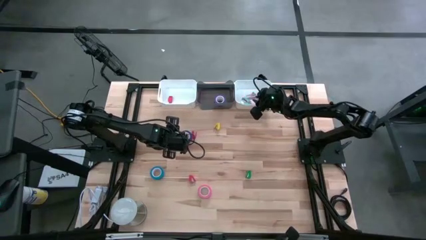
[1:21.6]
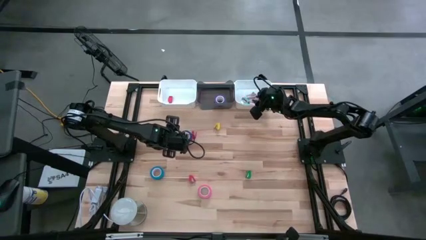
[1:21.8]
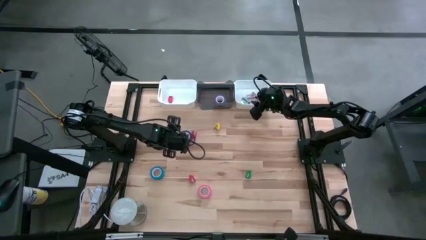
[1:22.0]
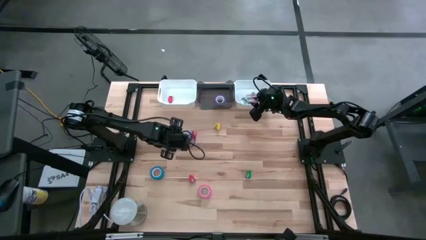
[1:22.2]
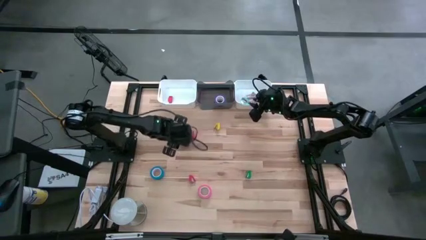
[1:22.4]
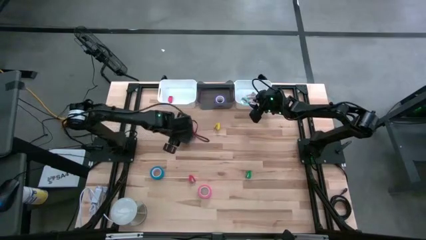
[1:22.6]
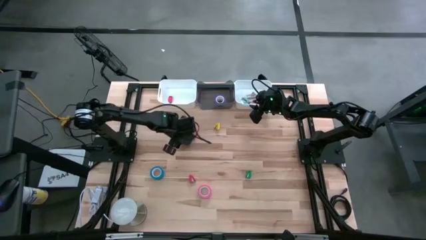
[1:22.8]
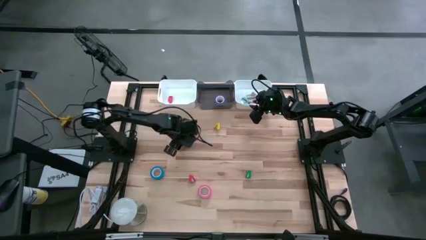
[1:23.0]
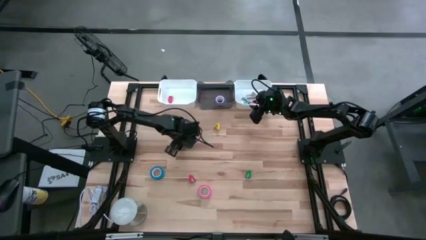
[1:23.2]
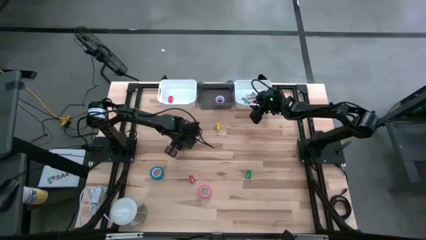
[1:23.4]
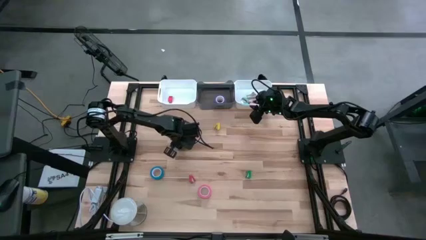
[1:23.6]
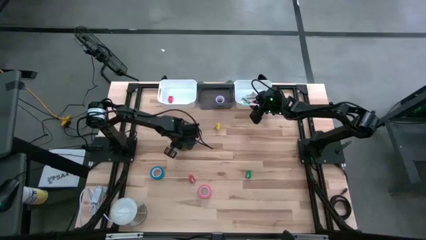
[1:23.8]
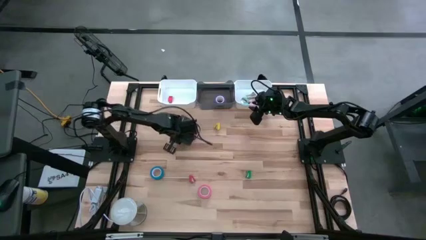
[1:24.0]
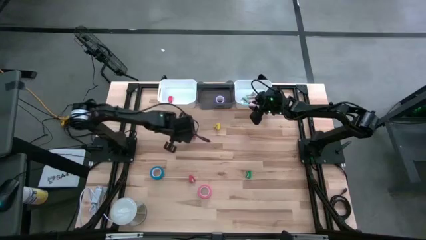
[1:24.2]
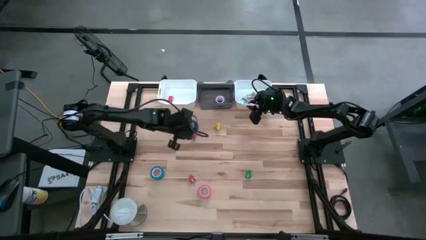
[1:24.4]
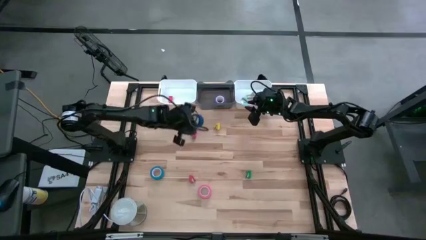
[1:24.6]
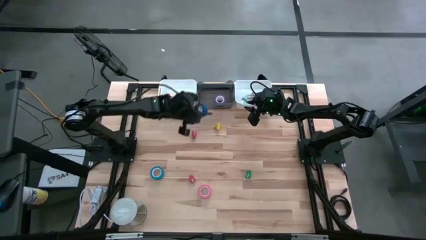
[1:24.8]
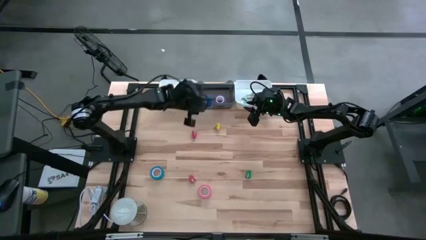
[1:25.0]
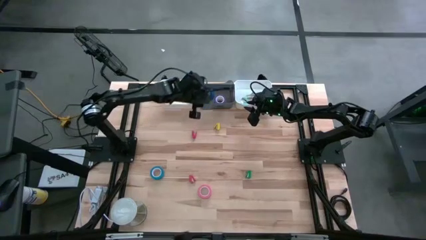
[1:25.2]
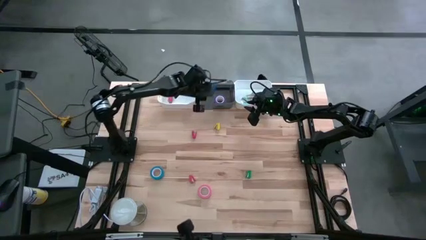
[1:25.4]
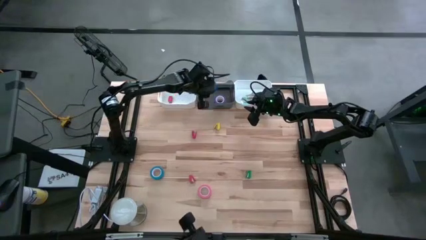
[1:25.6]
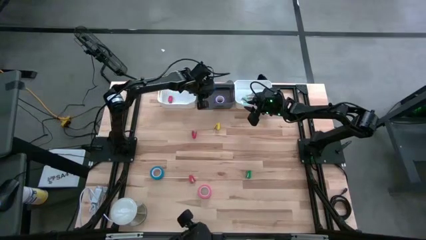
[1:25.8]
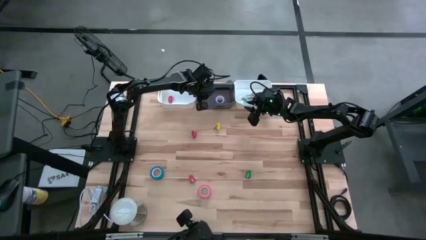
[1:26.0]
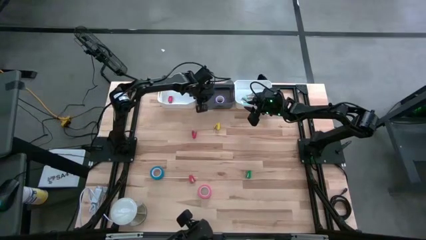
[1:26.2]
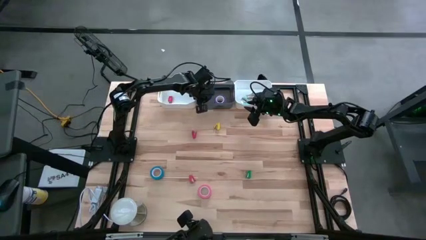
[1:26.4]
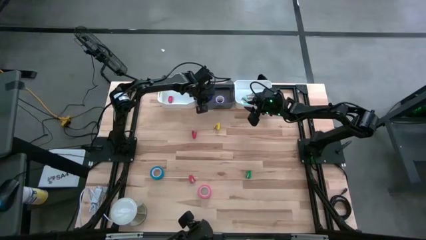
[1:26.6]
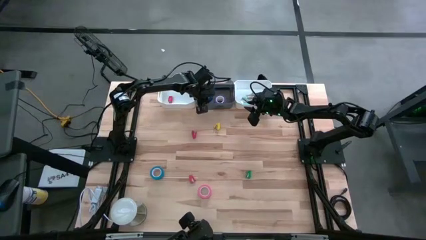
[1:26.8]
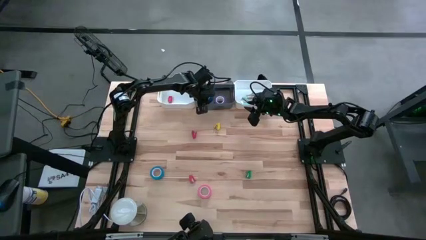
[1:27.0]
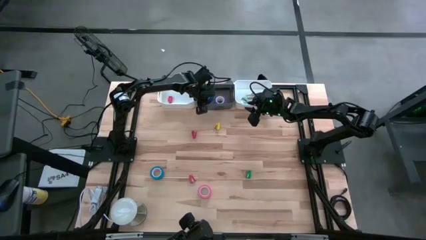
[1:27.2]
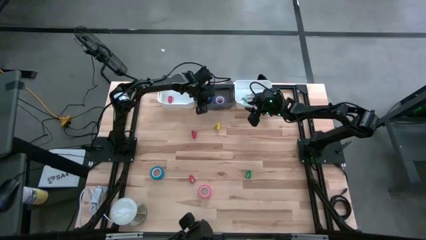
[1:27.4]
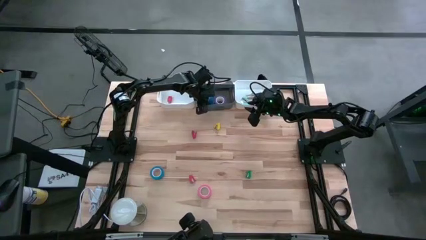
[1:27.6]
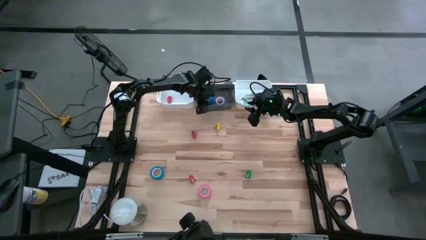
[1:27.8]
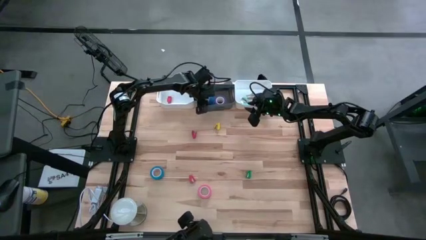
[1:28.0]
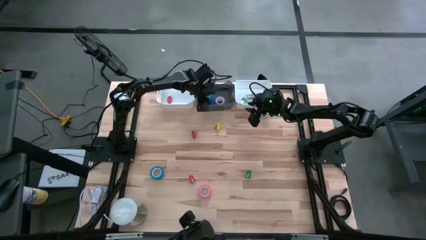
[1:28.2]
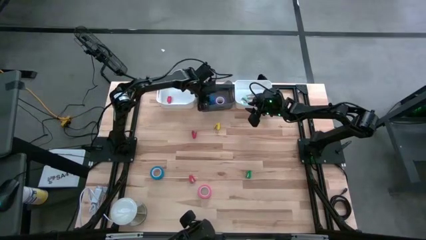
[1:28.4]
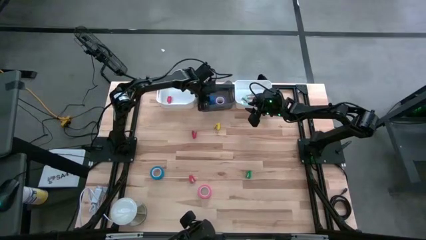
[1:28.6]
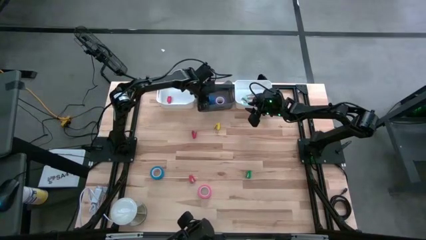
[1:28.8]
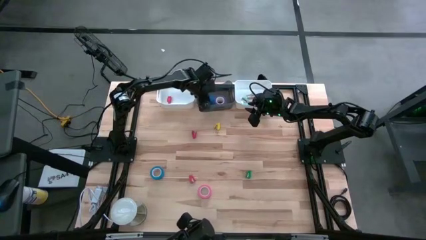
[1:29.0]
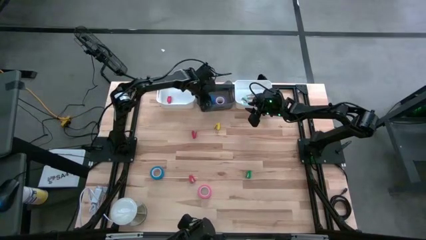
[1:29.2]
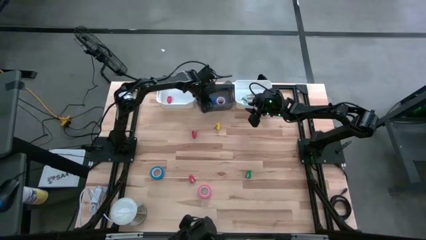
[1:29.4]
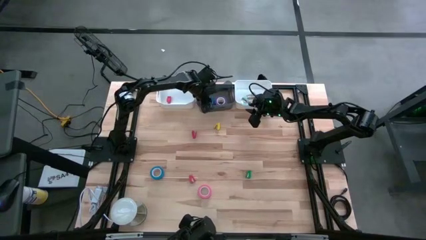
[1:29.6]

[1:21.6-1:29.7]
Task: Pick and place Stapler, Stapler remover, tape
Put the blue tape into the black bin

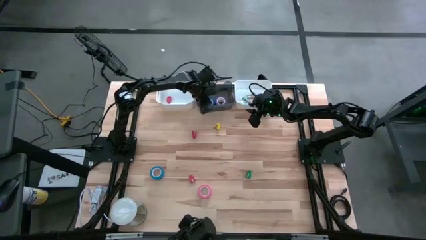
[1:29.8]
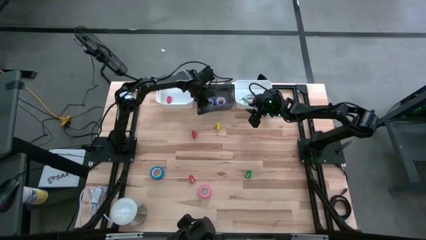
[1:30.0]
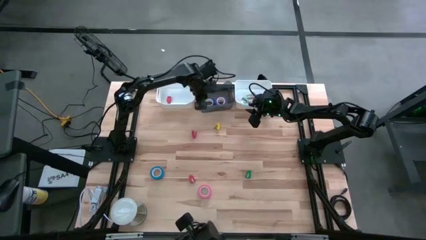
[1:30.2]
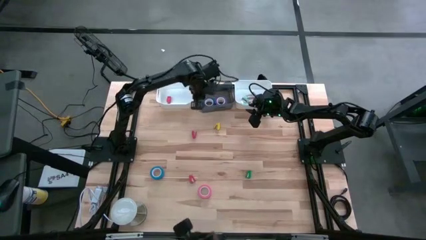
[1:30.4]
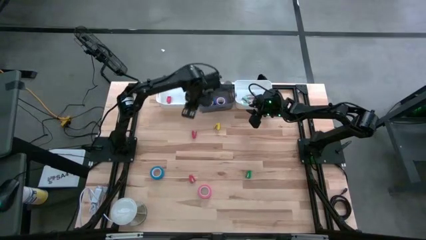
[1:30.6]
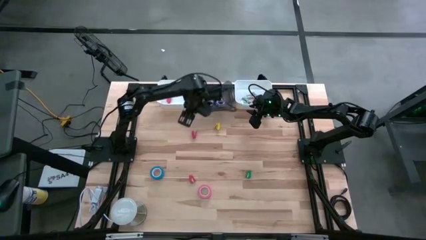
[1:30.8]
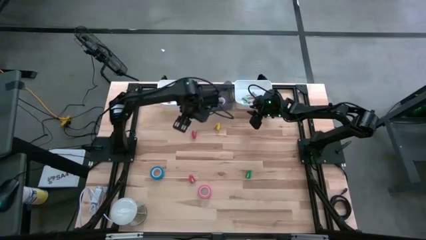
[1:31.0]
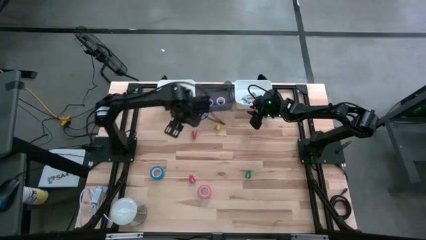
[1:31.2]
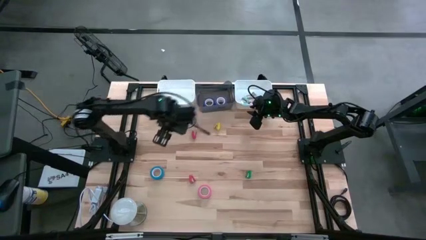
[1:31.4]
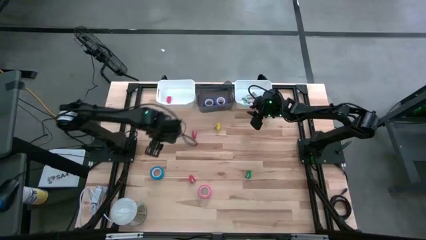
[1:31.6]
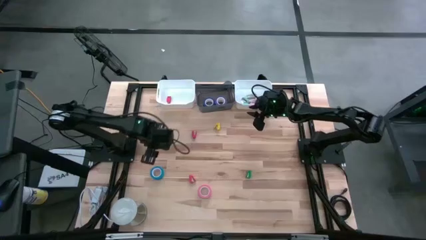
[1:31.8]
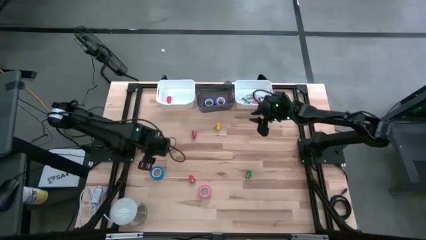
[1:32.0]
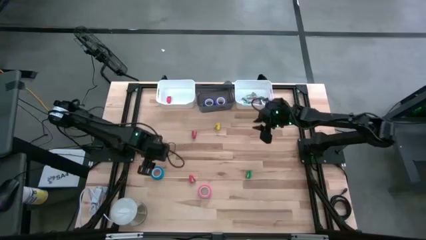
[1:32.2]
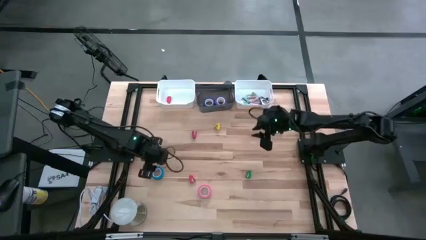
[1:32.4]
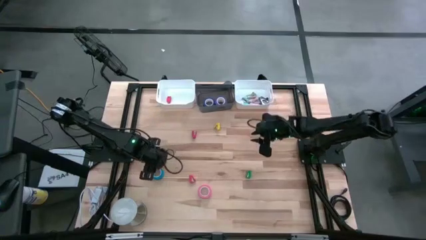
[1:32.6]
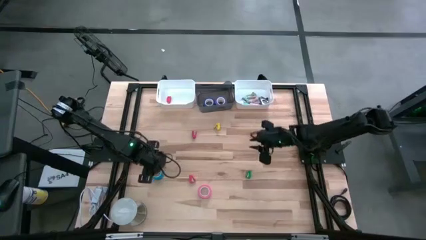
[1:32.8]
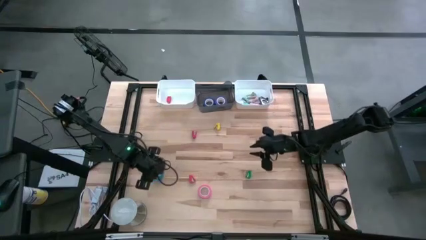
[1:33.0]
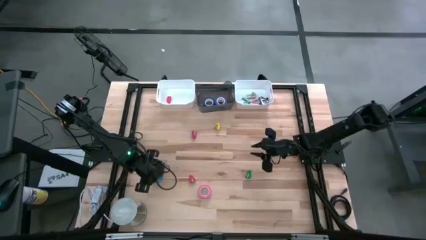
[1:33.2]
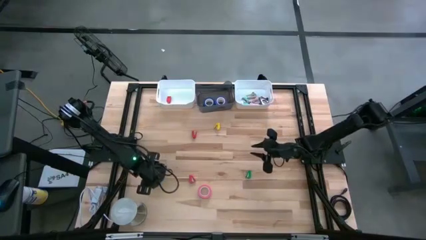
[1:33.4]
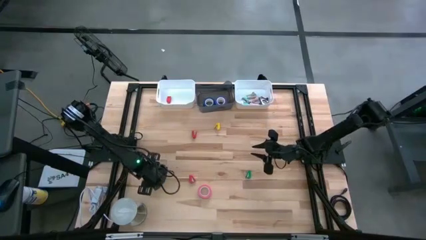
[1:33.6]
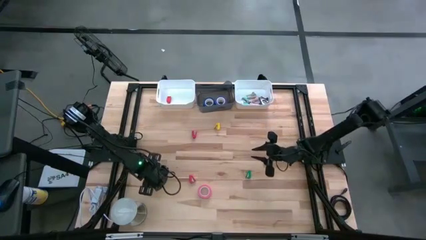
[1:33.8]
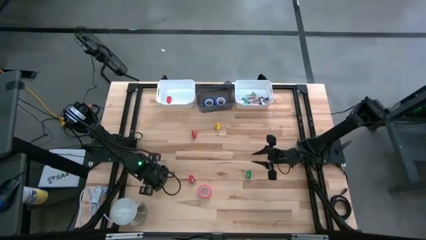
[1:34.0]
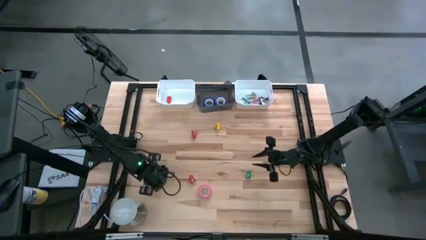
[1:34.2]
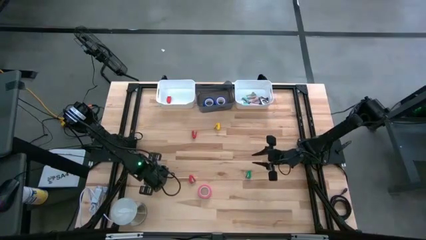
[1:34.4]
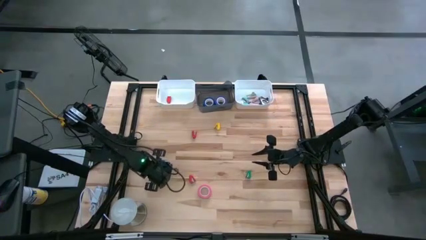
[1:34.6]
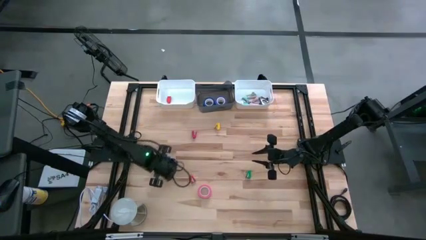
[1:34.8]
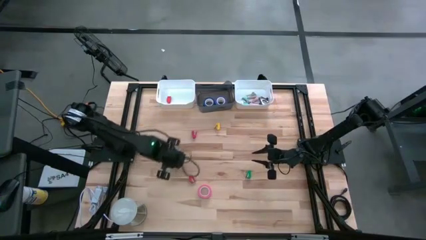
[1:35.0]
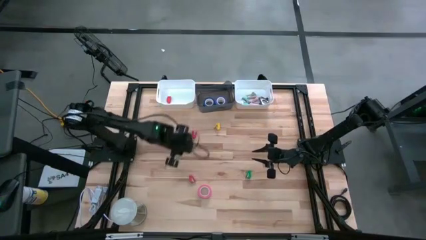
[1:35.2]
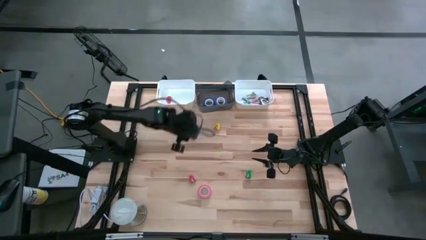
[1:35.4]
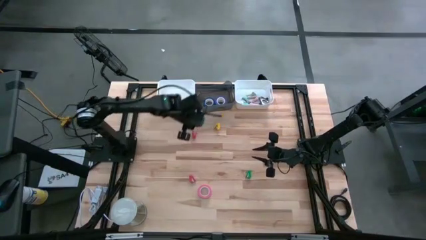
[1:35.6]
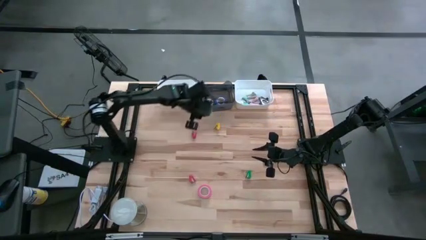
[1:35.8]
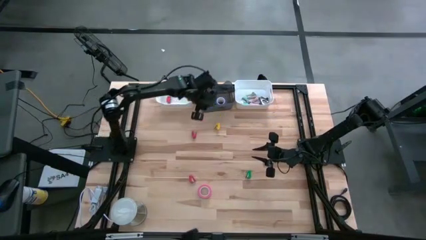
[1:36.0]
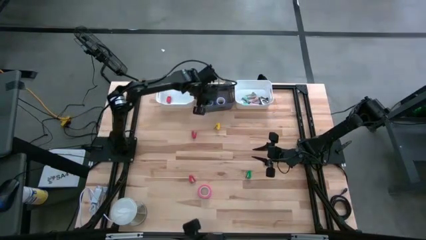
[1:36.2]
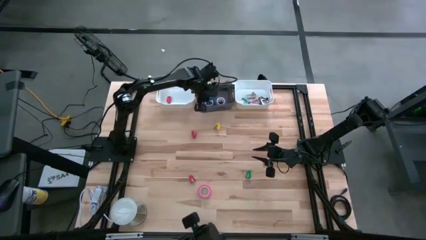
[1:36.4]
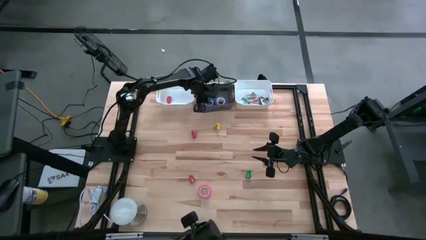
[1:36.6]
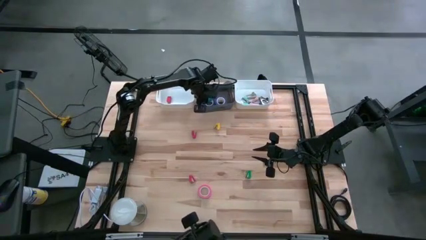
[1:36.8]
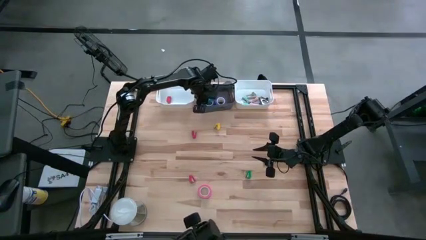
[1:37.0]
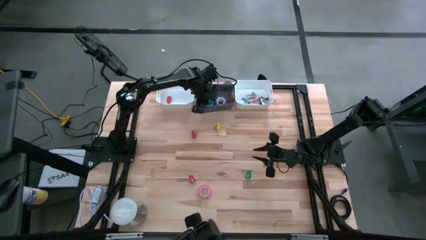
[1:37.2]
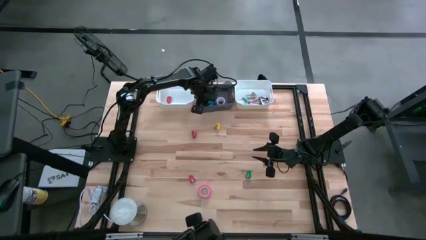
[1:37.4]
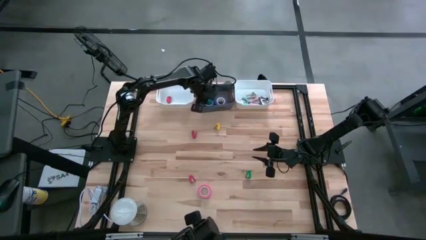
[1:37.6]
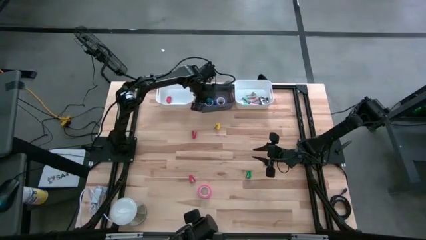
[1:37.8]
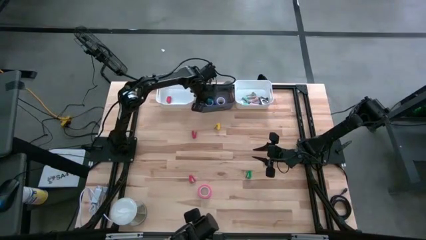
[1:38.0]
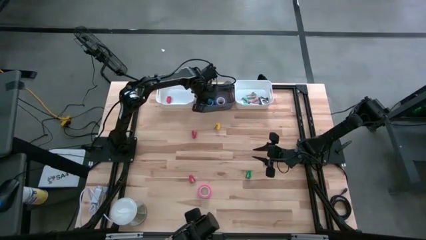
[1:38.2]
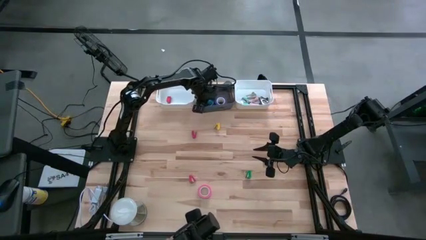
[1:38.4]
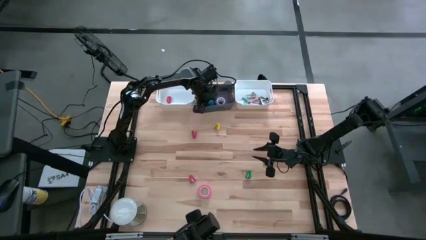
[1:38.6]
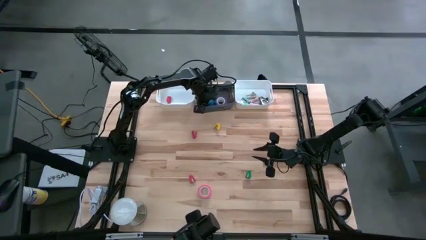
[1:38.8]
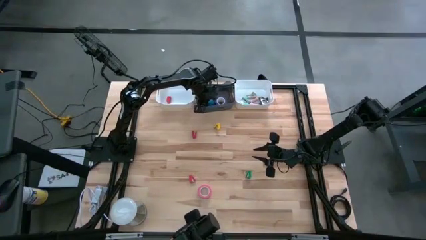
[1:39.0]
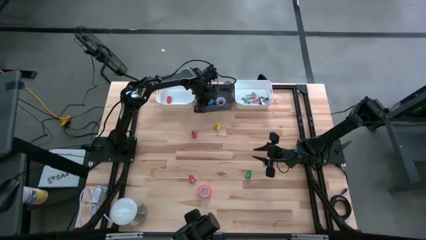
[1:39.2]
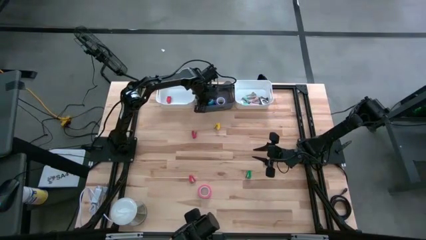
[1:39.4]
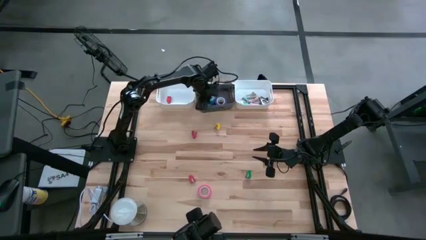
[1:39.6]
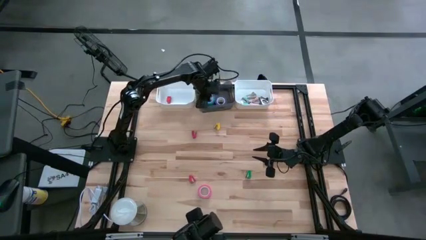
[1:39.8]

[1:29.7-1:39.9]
Put the light blue tape into the black bin
